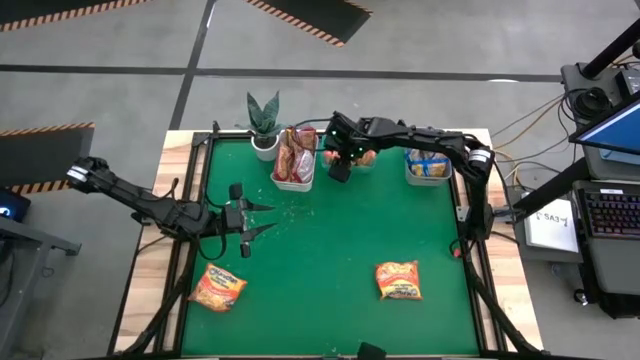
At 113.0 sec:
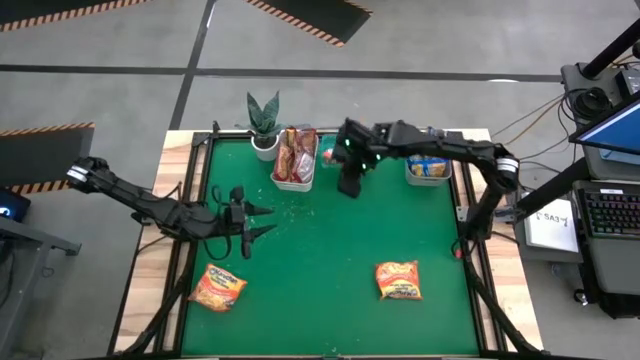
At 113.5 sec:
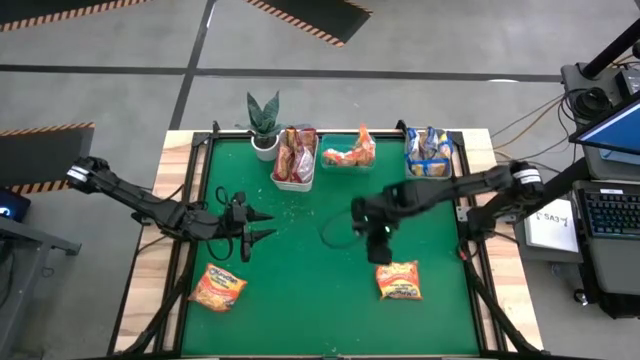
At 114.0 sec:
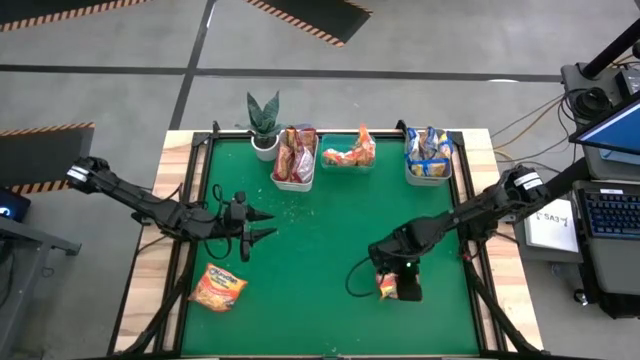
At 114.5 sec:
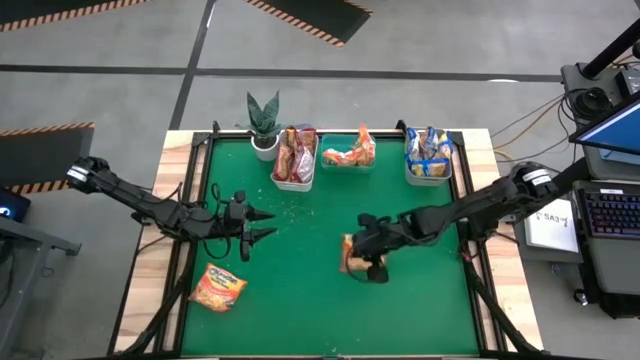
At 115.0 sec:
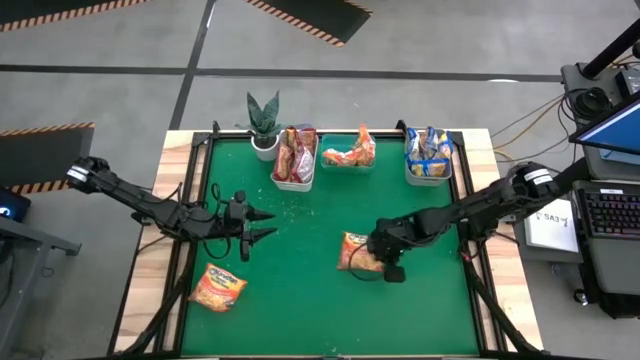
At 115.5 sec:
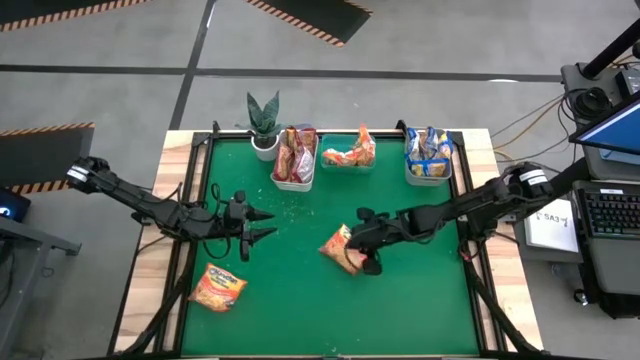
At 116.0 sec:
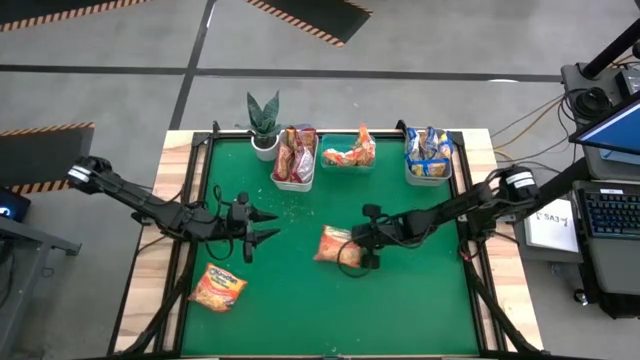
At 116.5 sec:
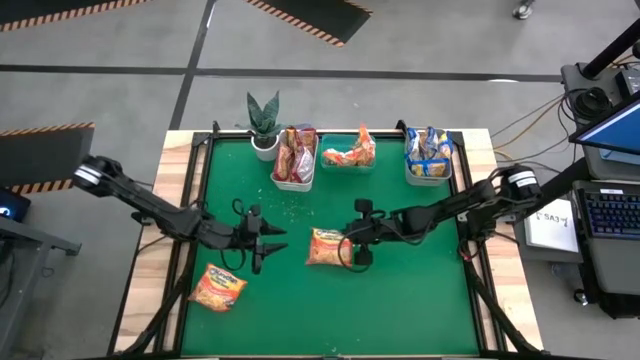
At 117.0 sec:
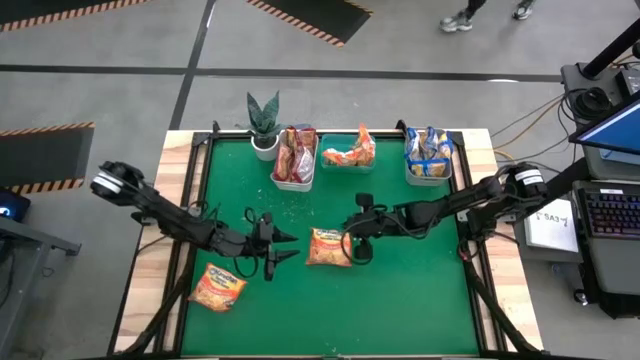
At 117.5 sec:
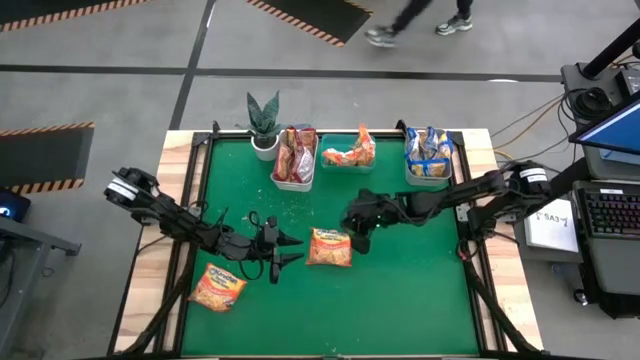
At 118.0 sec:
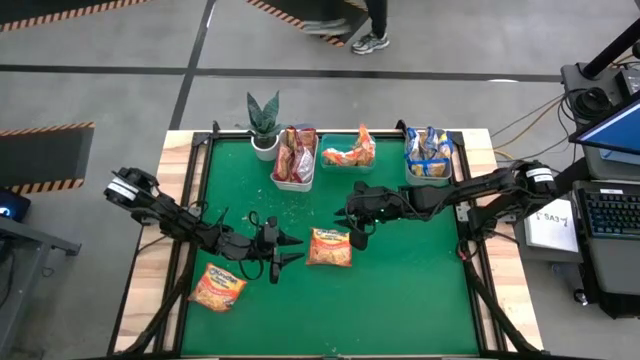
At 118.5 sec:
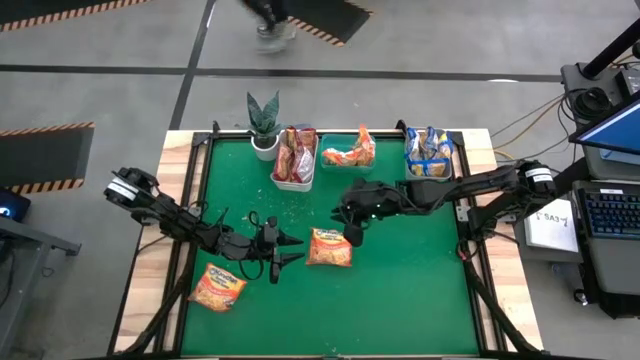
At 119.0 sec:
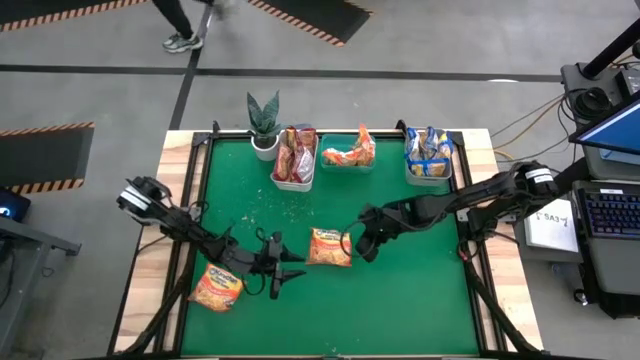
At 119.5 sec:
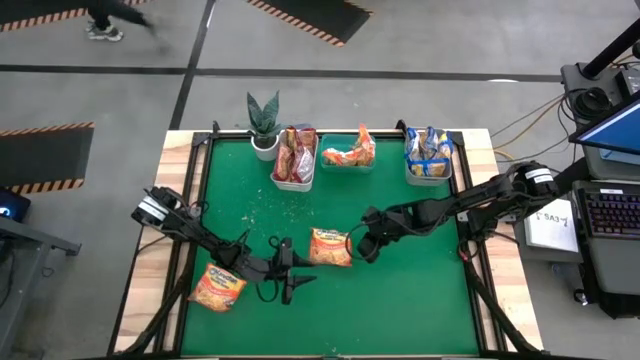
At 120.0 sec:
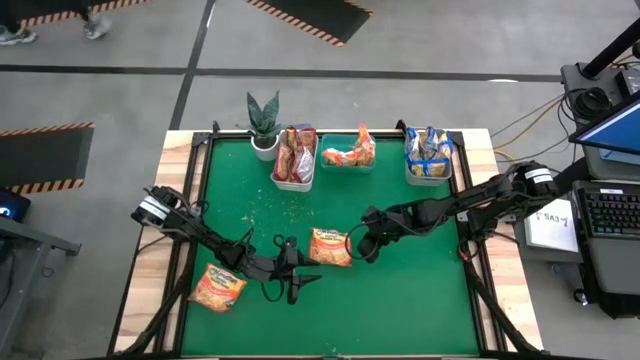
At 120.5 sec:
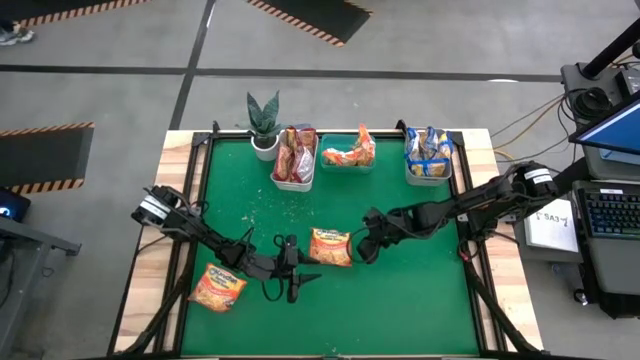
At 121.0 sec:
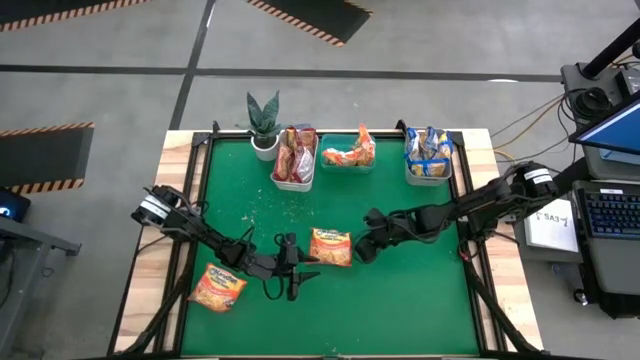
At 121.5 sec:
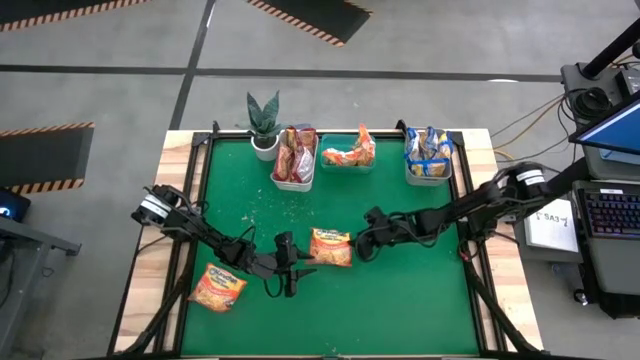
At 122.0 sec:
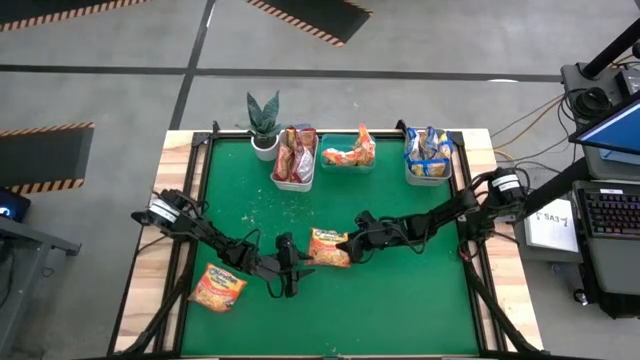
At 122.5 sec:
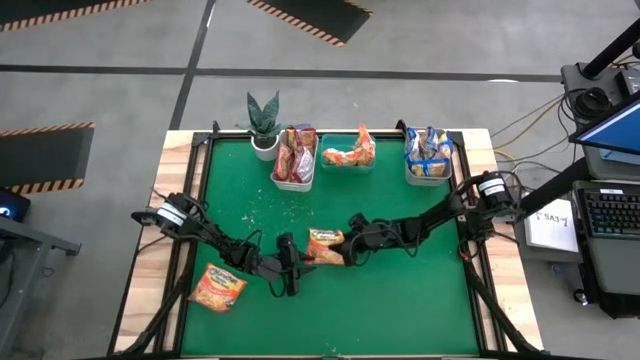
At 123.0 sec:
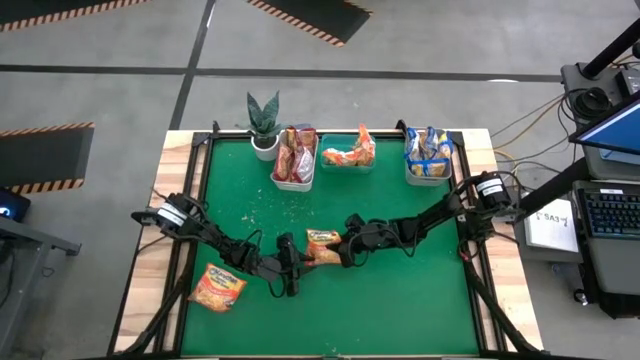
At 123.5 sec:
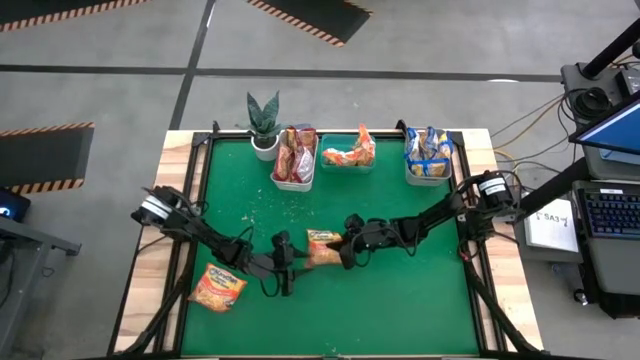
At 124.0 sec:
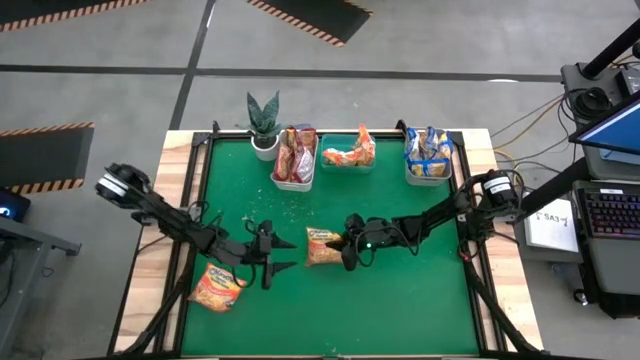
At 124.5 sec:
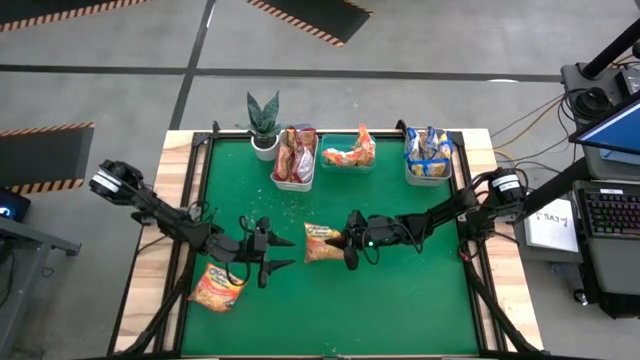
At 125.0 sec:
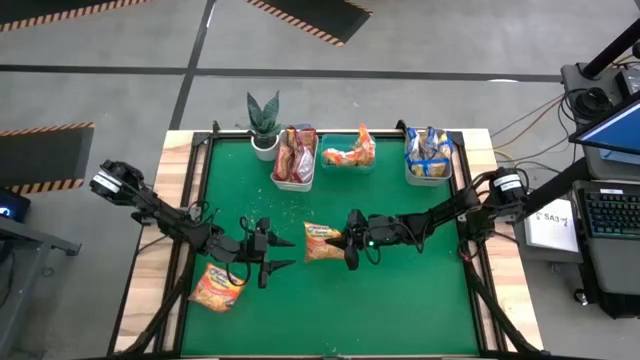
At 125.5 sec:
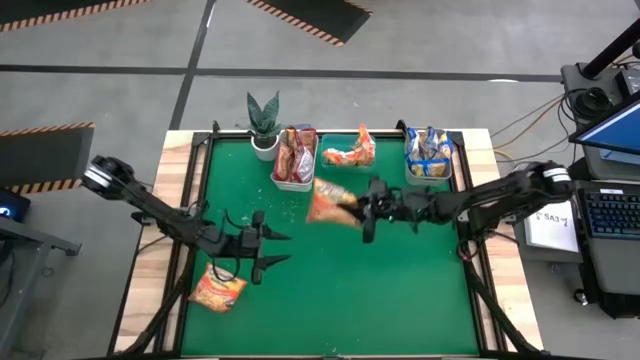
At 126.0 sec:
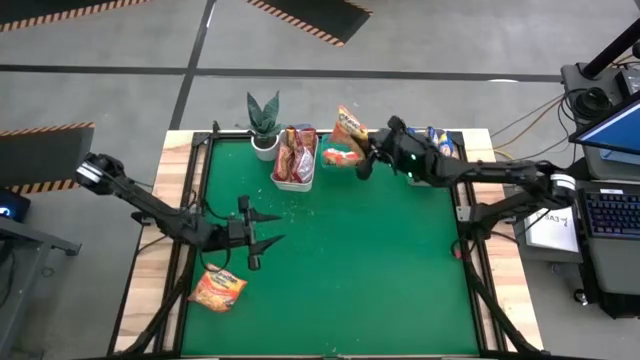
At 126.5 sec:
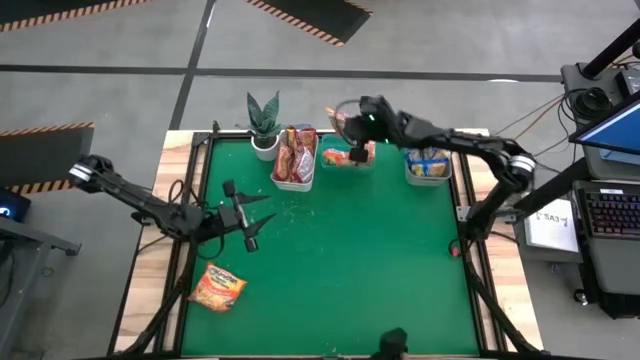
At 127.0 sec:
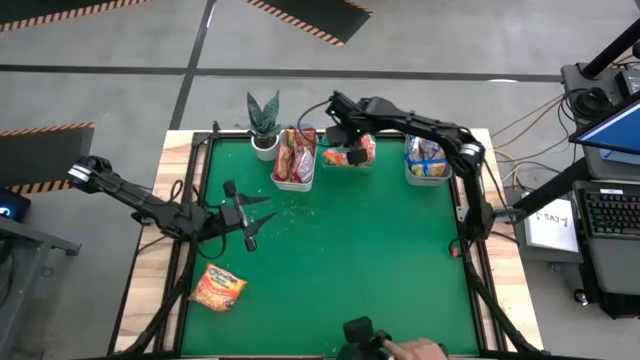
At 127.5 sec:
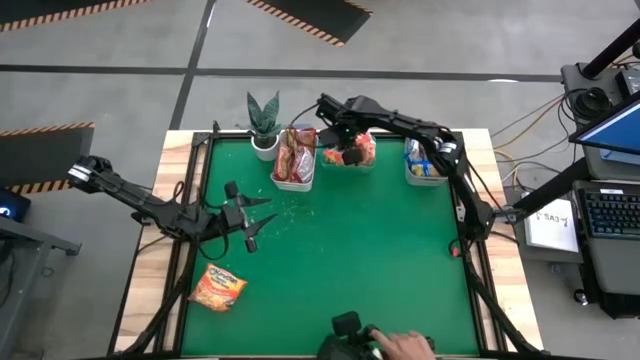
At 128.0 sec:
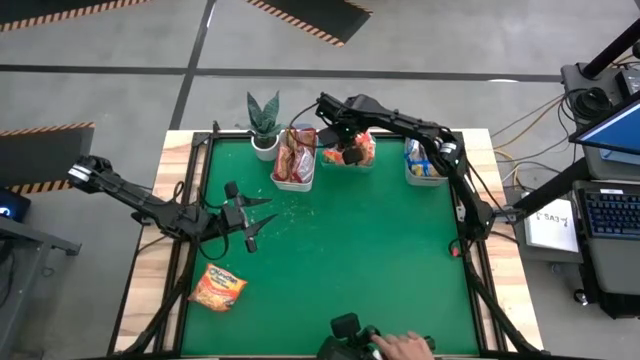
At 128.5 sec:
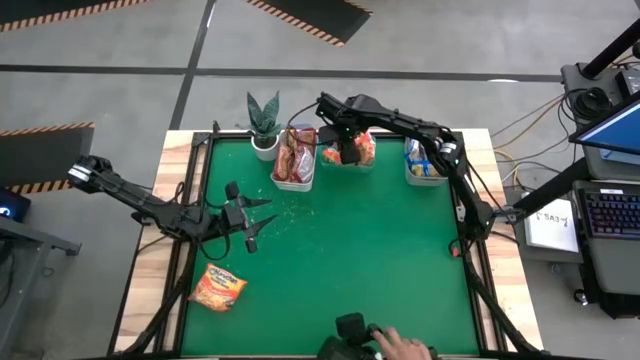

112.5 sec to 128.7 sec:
Task: Sort Maruchan noodles
Put the orange noodle pack into the green bin

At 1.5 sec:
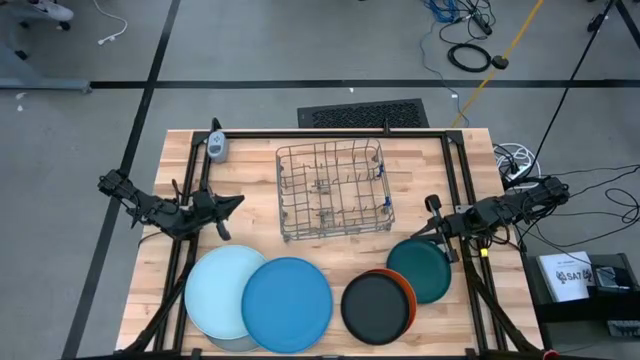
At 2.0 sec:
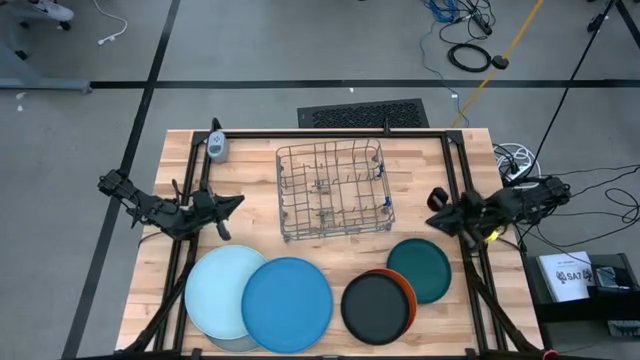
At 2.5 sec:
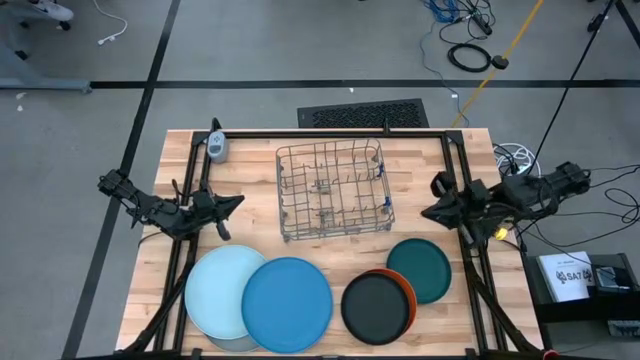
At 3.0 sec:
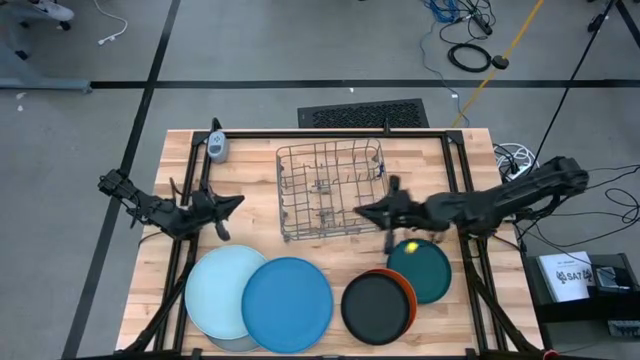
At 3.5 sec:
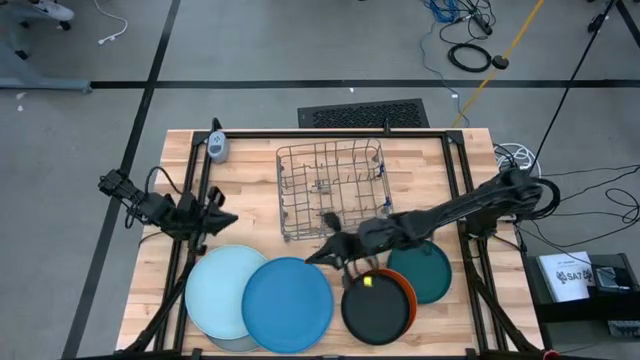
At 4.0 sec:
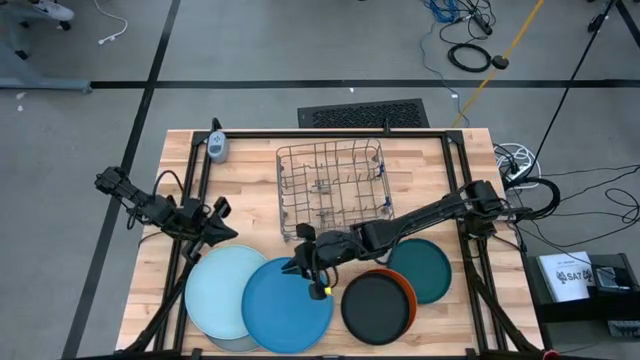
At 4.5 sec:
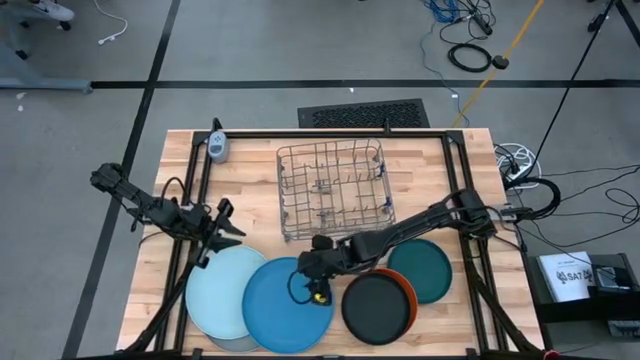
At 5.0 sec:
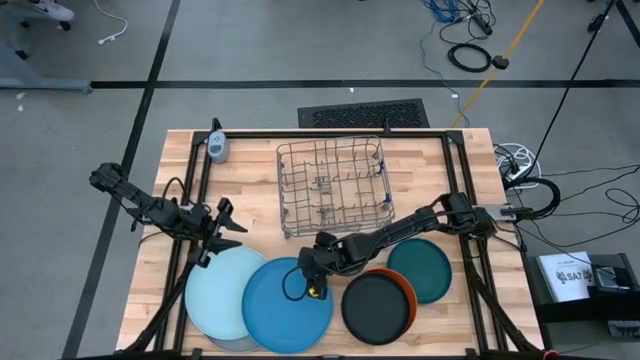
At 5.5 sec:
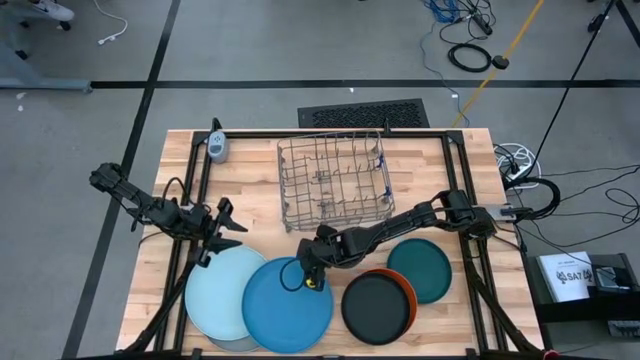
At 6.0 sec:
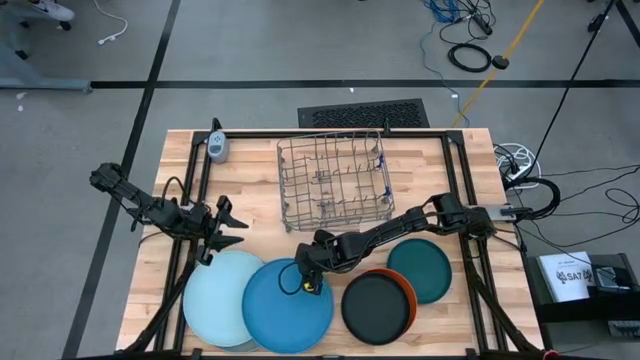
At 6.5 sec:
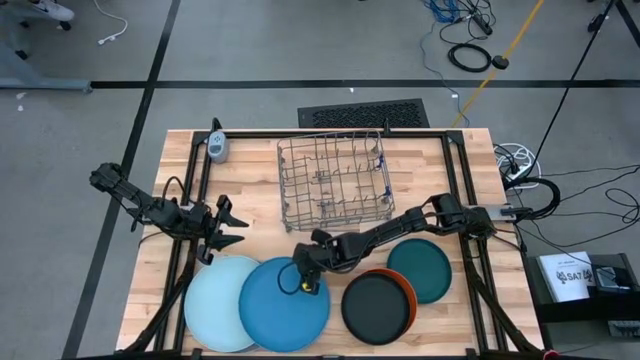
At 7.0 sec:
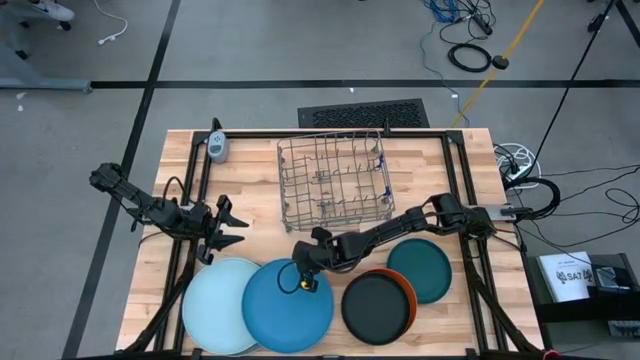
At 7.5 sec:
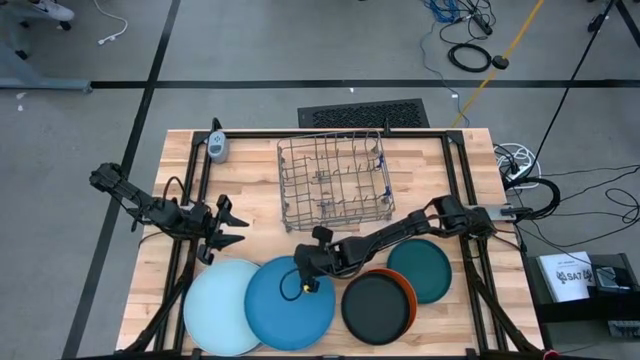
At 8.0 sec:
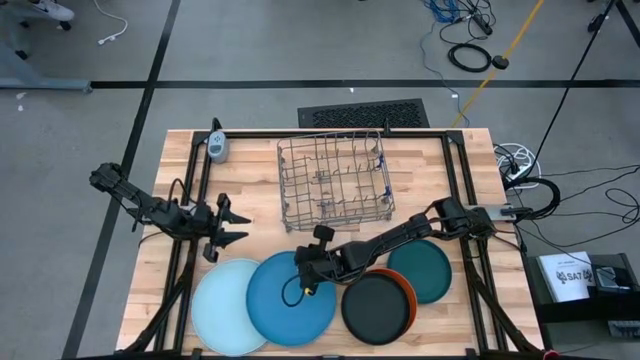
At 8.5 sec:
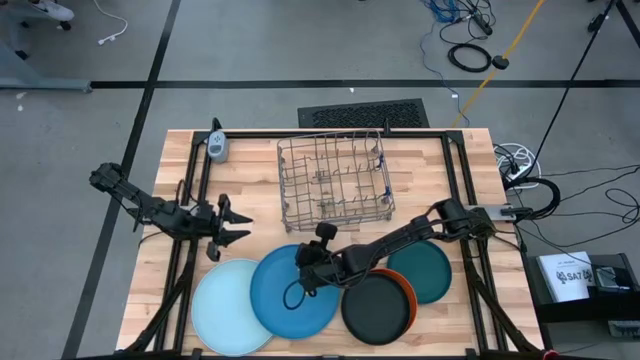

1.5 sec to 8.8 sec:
Task: Sort dishes
Put the blue plate in the dish rack
